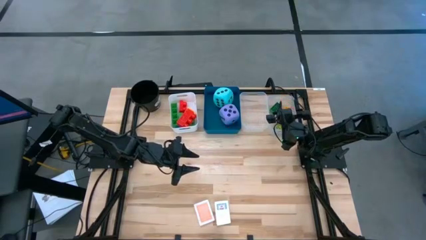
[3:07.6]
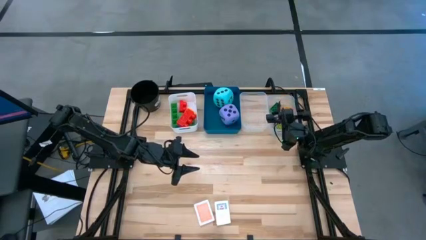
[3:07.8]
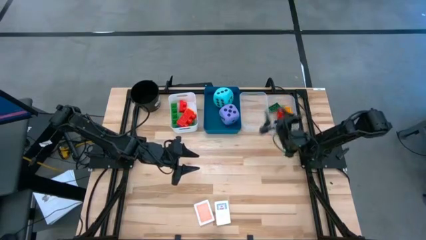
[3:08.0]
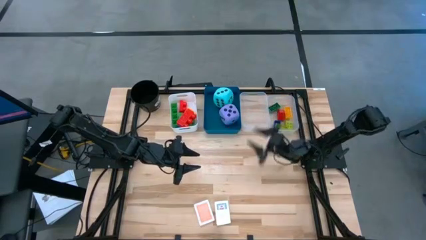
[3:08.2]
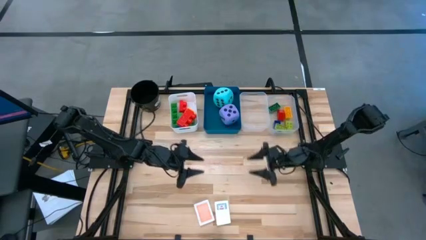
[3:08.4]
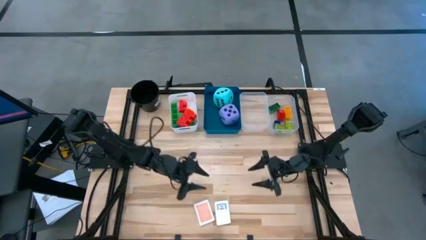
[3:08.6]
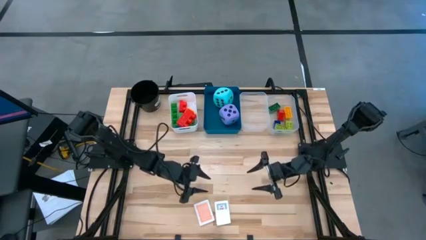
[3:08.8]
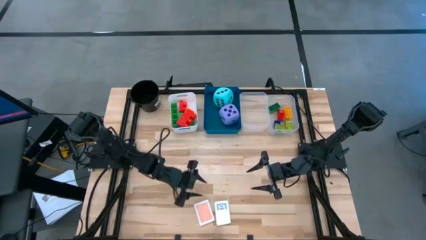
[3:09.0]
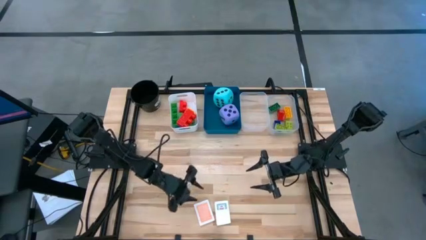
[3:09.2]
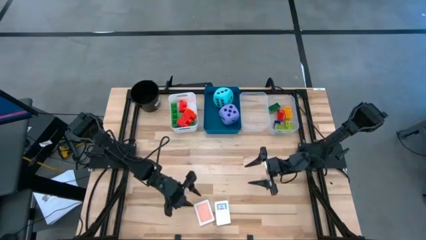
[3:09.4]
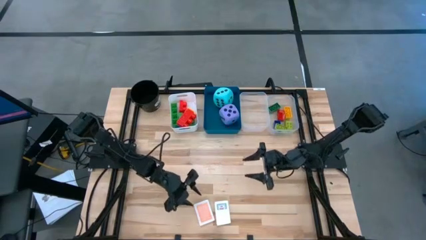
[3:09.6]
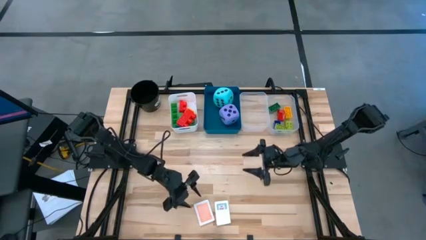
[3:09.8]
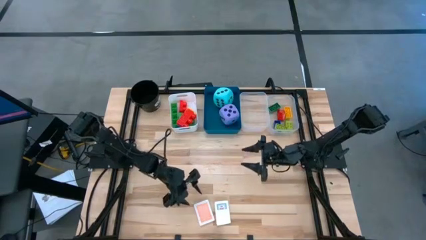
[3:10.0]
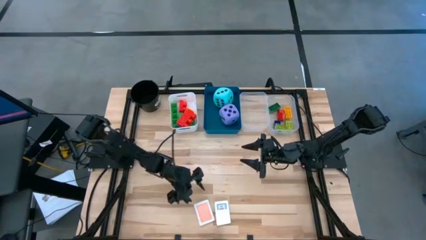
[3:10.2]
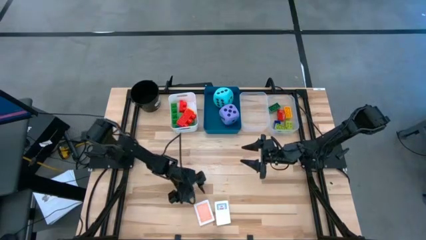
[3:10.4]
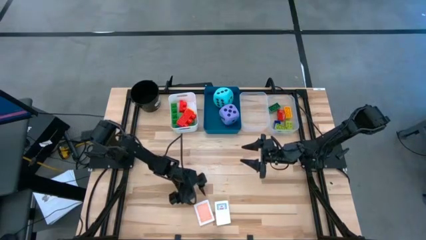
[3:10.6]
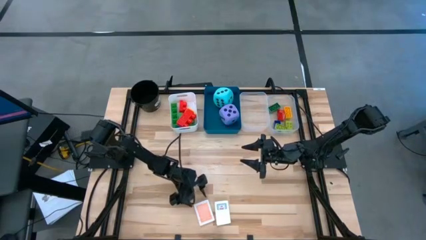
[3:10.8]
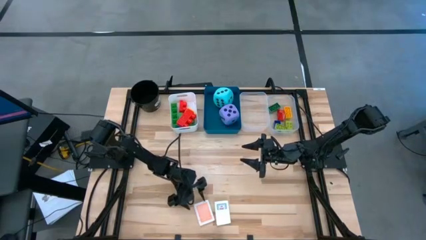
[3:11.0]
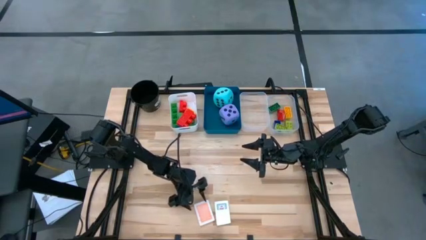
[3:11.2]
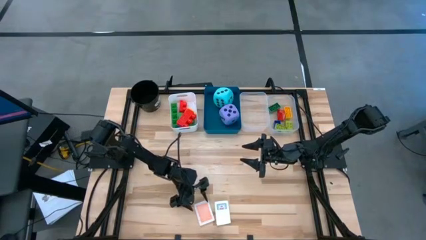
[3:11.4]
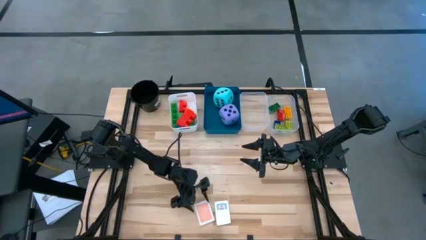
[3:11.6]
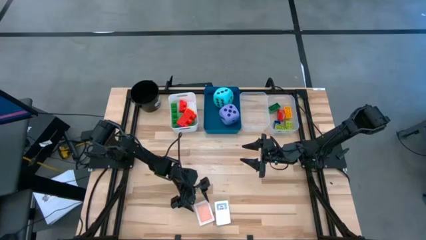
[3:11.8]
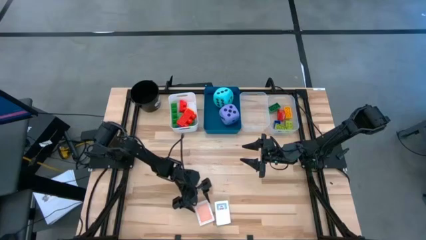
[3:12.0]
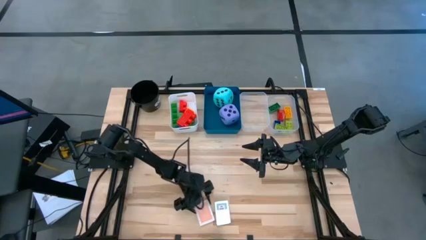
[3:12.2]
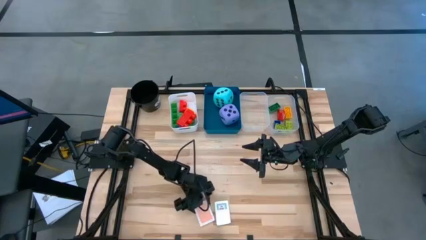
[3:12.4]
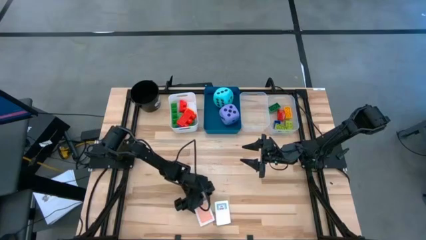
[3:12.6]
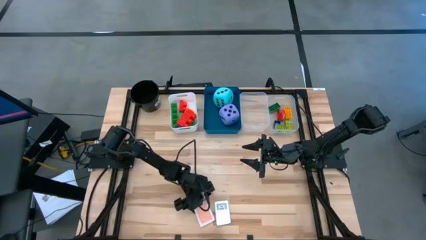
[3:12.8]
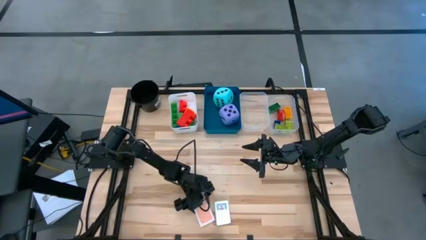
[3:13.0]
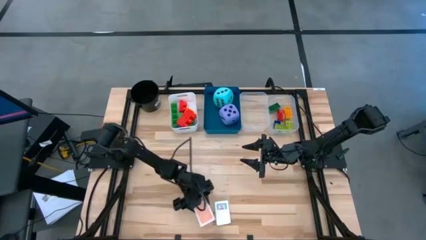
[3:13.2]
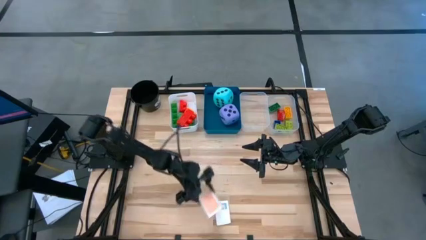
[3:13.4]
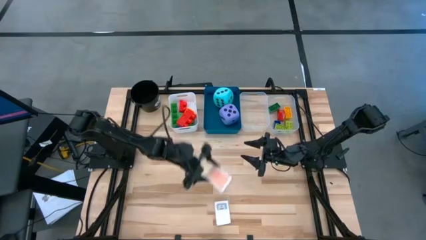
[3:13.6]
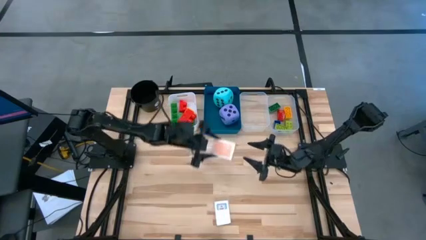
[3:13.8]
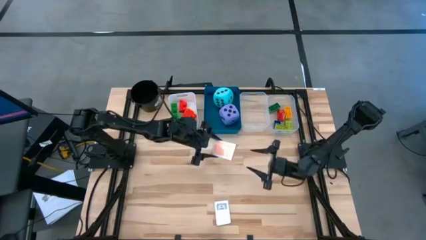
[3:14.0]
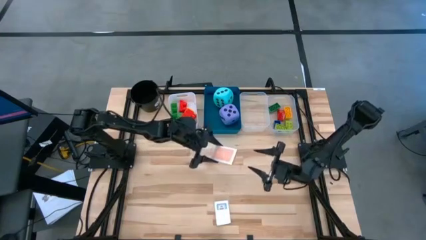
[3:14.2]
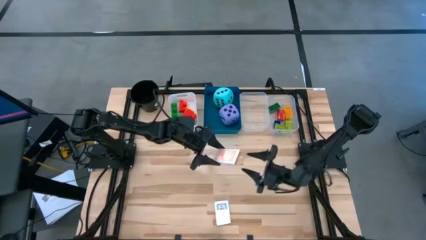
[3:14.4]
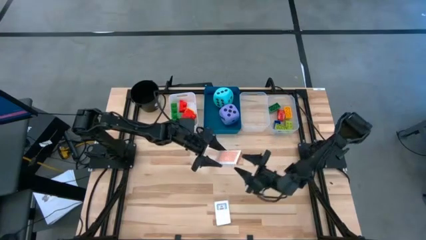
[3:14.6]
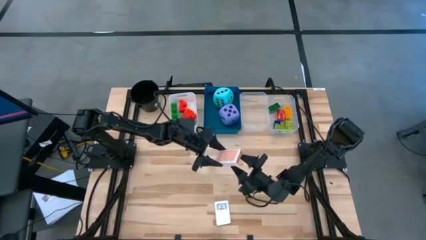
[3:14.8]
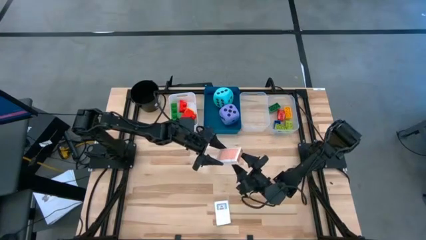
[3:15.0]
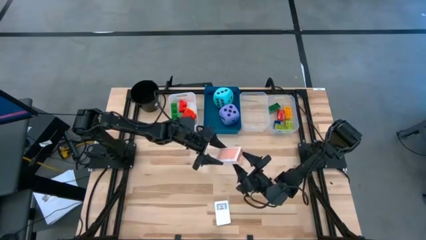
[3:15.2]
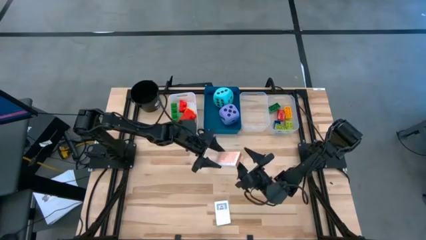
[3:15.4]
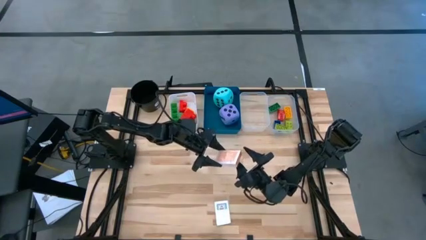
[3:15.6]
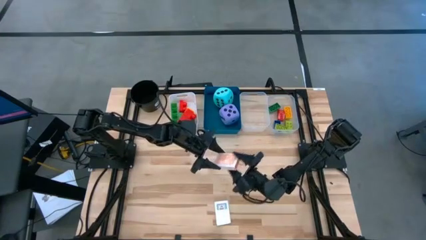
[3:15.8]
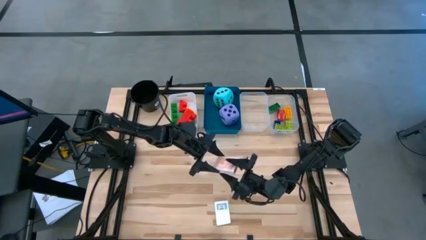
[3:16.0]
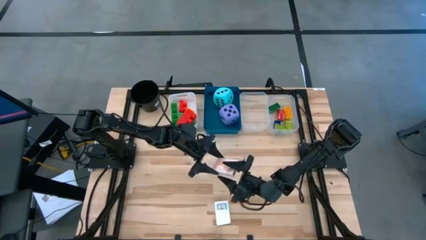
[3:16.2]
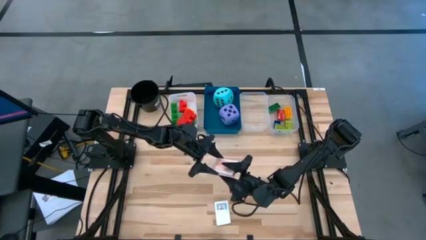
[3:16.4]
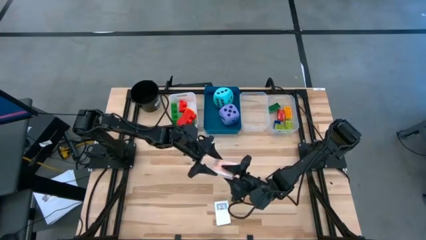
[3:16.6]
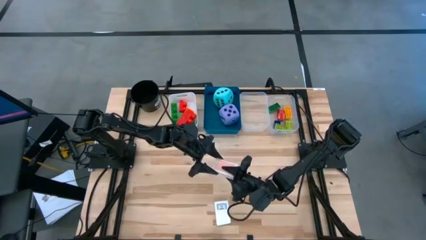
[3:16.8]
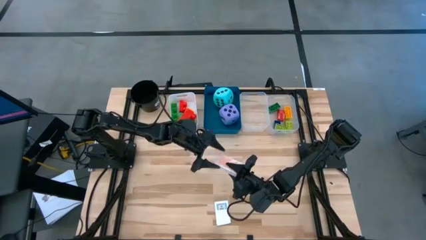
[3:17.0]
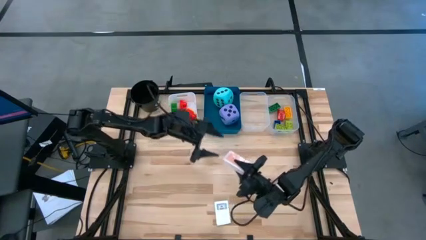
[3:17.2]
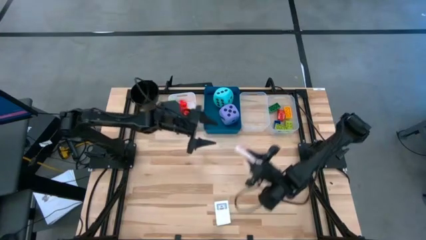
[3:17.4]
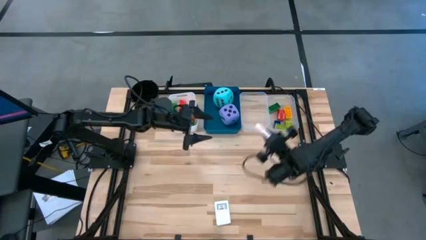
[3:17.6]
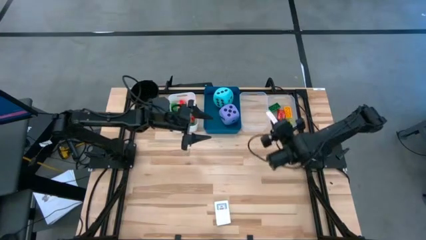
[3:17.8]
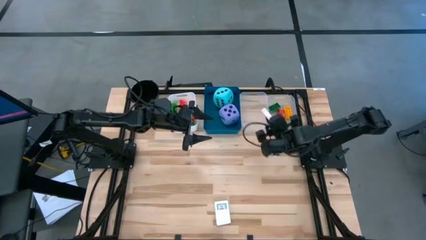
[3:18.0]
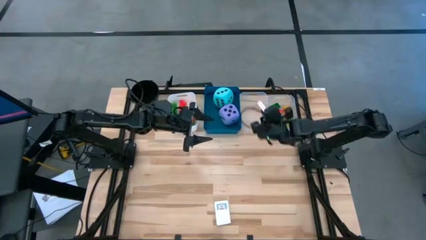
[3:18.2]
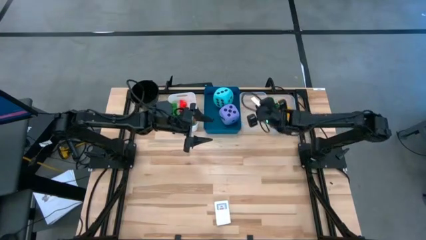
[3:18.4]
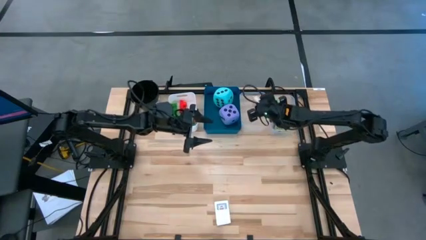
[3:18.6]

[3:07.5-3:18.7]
Task: Pick & Place Toys
Put the orange deck of cards into the left transparent bin

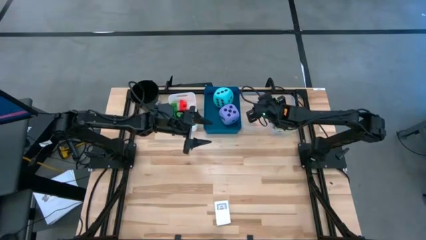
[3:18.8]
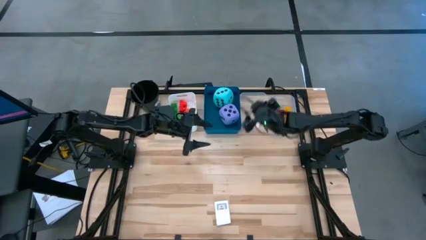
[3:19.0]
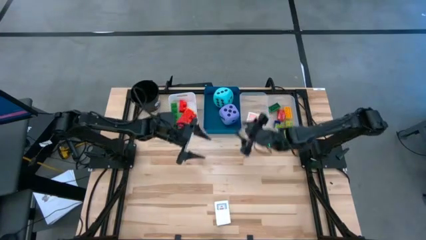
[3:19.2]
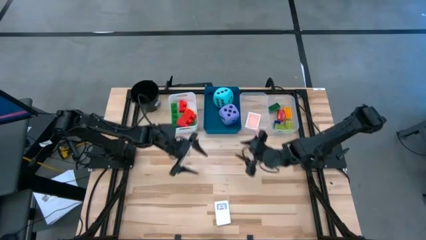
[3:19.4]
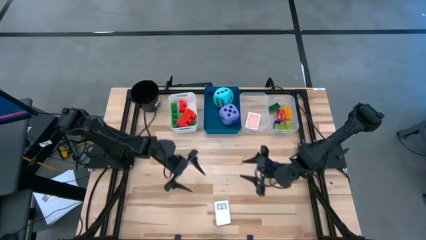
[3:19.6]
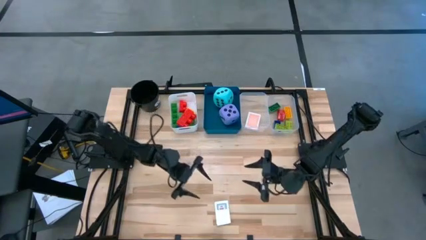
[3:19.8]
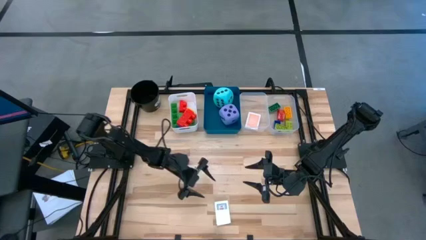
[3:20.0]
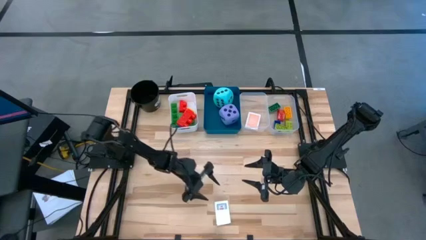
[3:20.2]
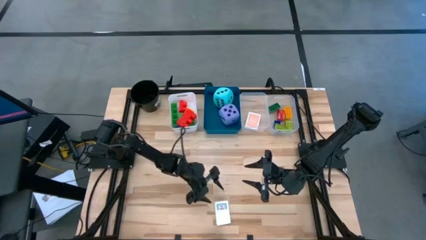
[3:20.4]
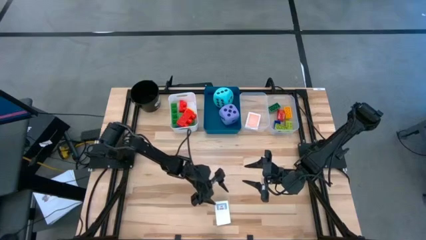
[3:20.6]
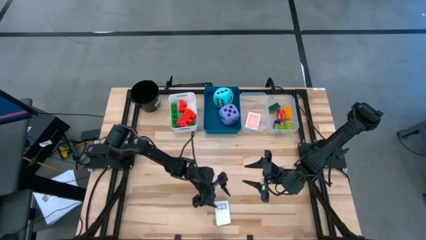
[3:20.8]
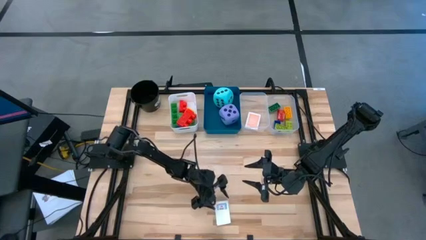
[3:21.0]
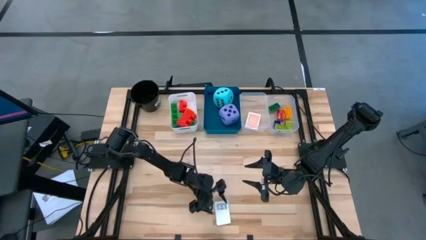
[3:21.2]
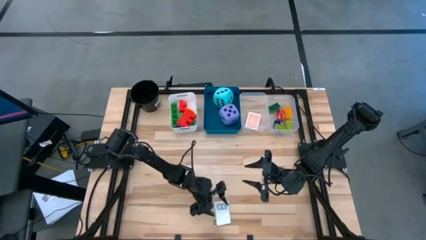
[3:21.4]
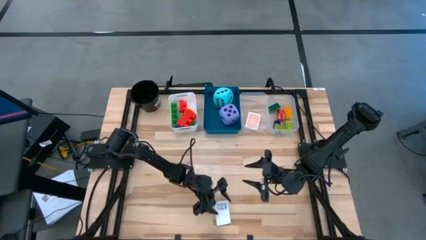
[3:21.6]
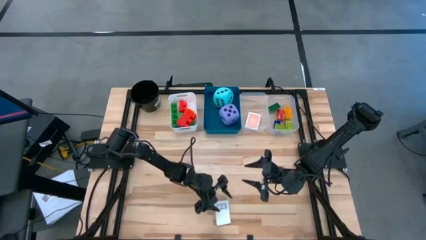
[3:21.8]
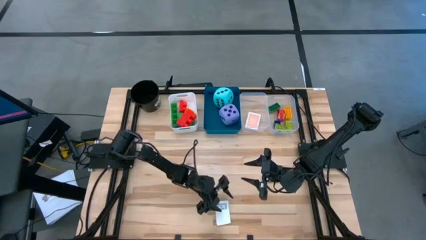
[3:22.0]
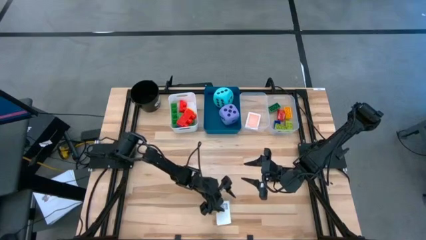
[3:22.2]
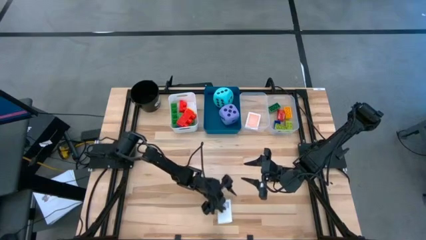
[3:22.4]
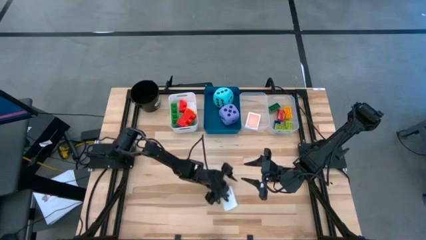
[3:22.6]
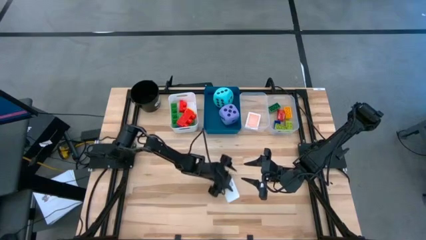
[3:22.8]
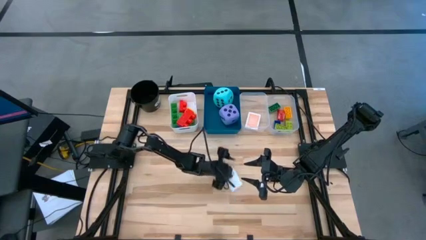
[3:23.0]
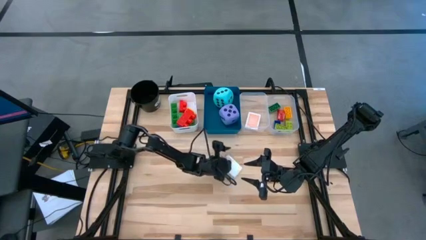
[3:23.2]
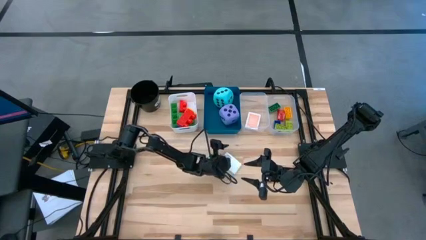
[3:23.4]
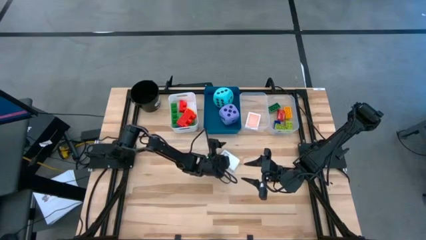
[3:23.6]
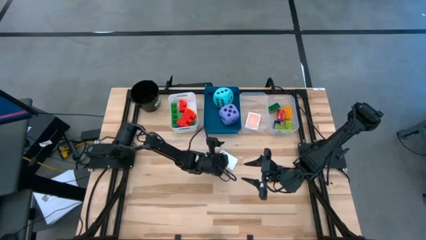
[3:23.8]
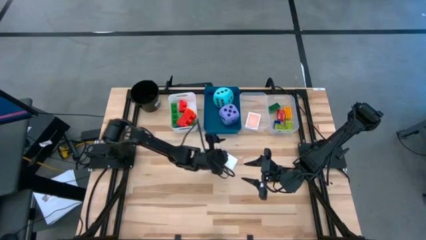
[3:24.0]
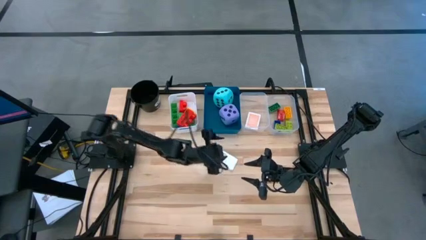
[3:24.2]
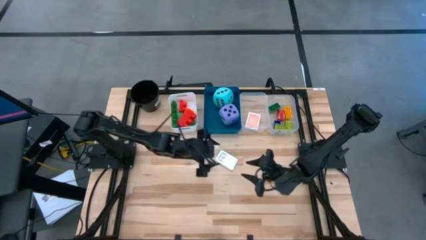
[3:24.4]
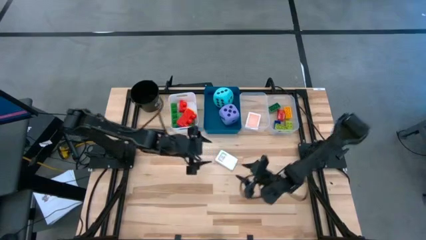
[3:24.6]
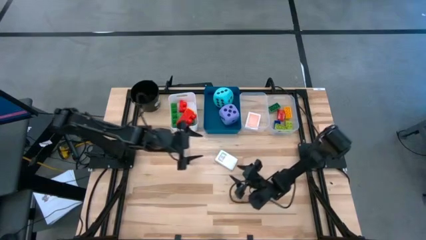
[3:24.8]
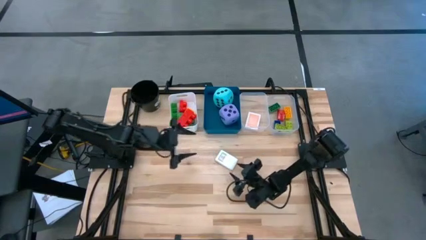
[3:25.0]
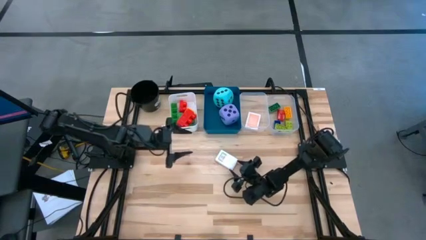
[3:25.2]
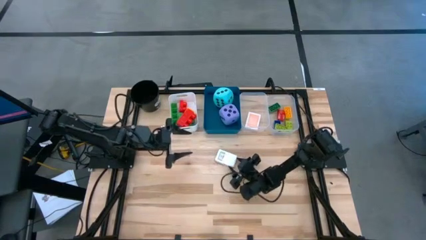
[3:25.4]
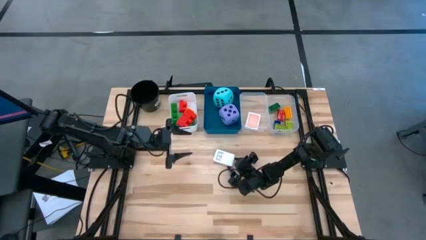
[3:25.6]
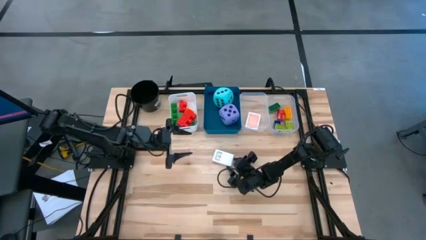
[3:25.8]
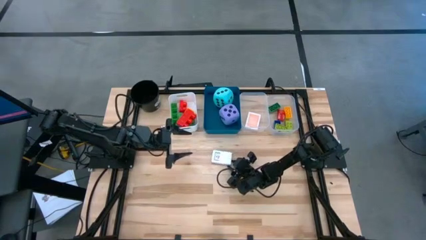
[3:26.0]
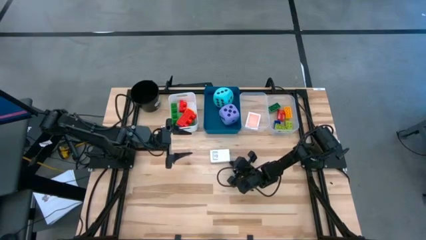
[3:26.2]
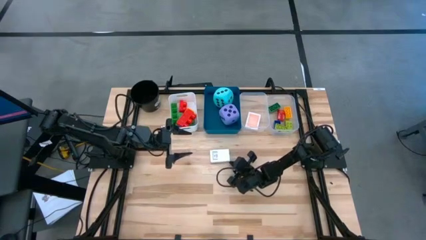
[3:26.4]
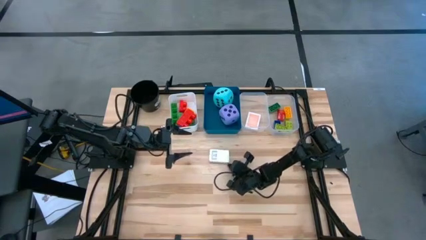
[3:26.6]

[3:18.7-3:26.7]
Put the white deck of cards into the left transparent bin
